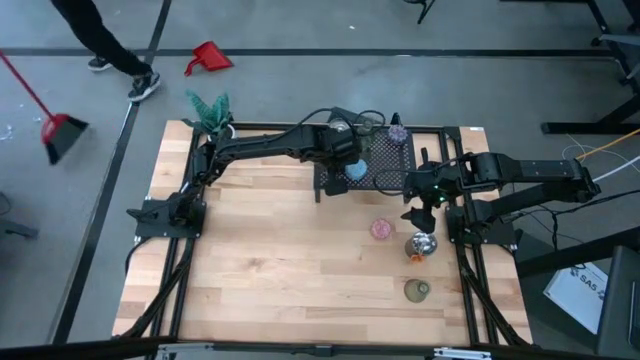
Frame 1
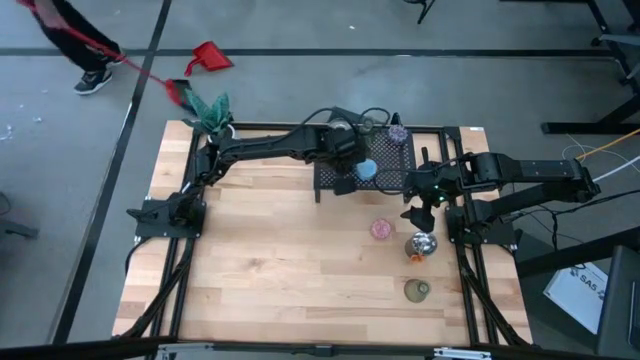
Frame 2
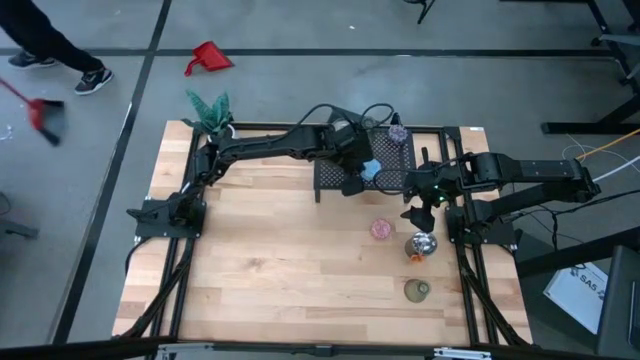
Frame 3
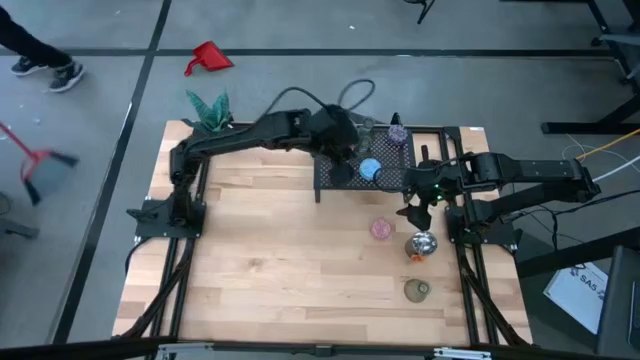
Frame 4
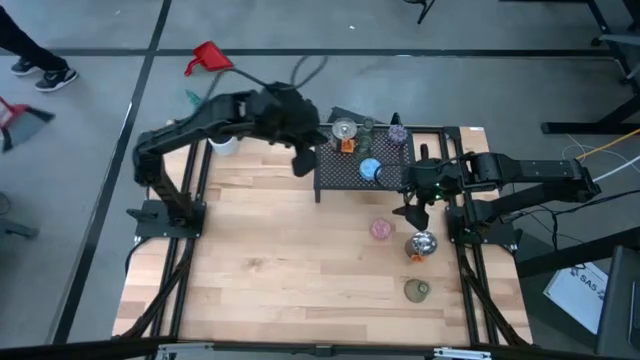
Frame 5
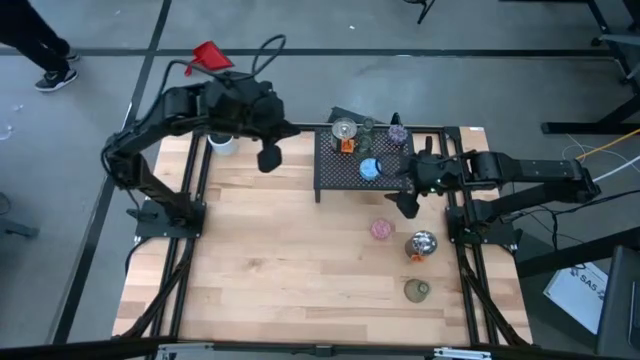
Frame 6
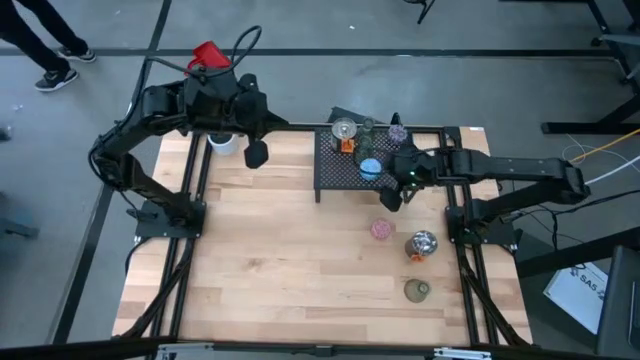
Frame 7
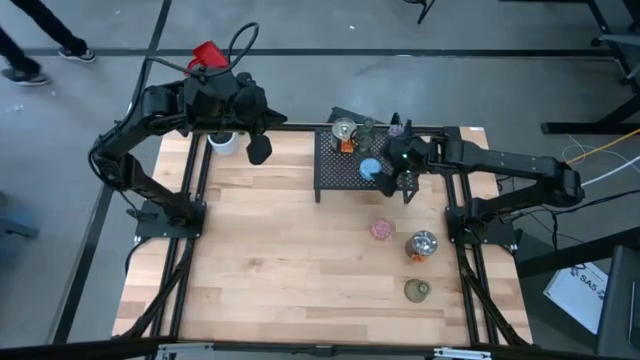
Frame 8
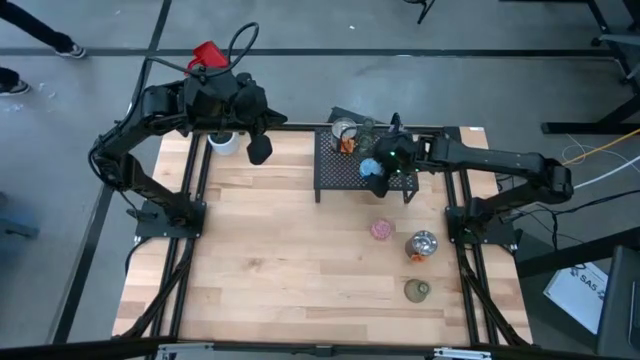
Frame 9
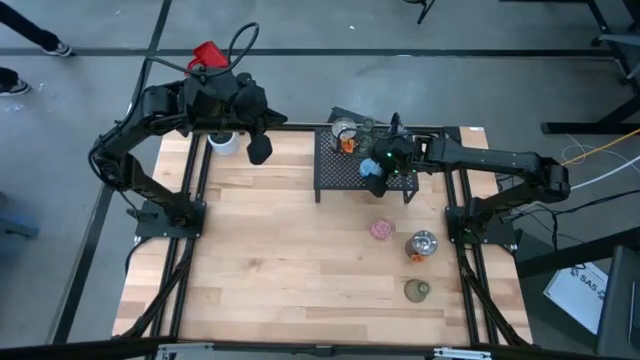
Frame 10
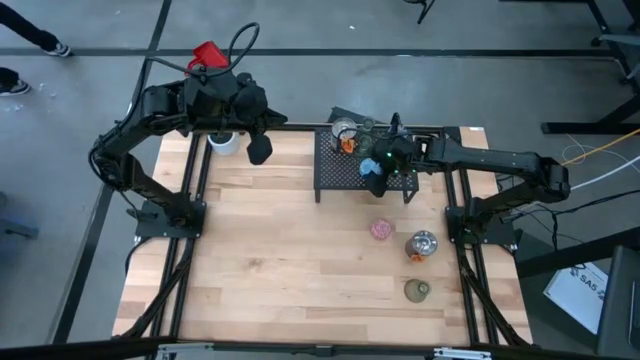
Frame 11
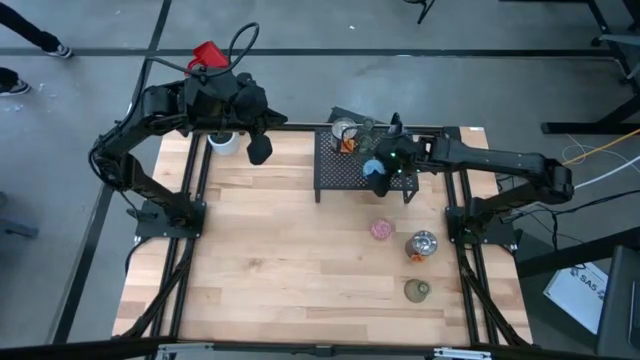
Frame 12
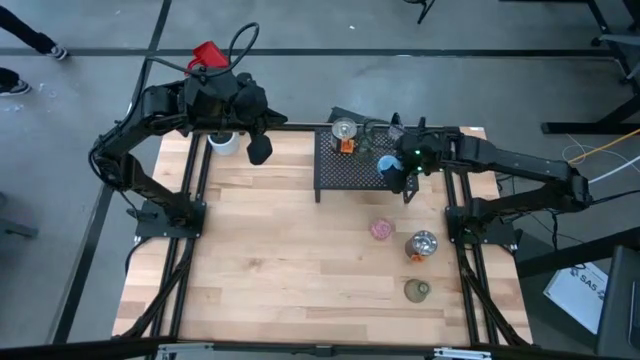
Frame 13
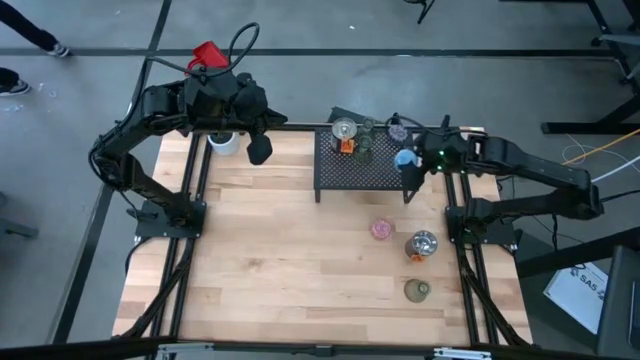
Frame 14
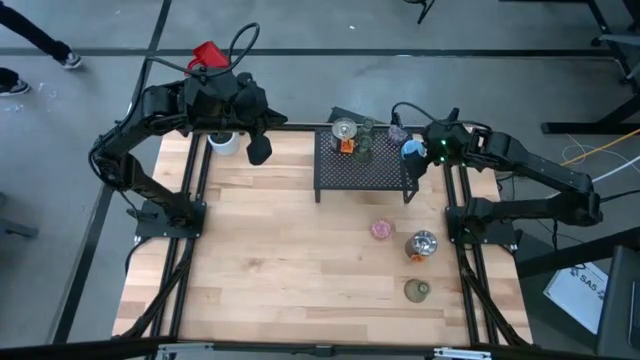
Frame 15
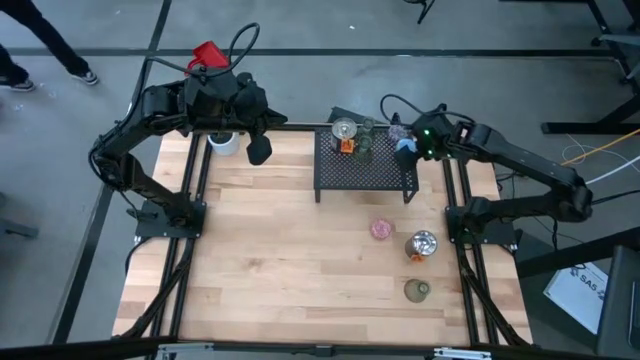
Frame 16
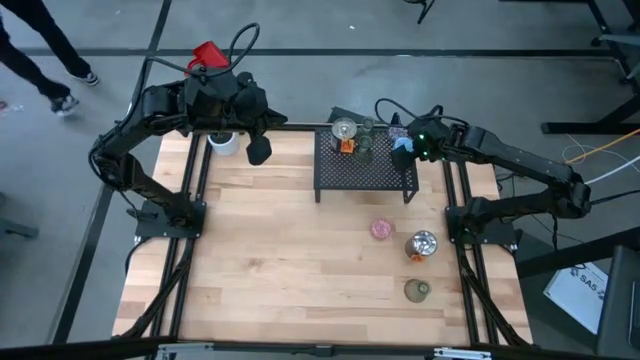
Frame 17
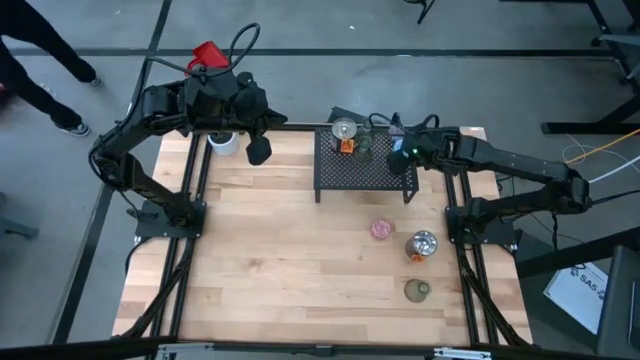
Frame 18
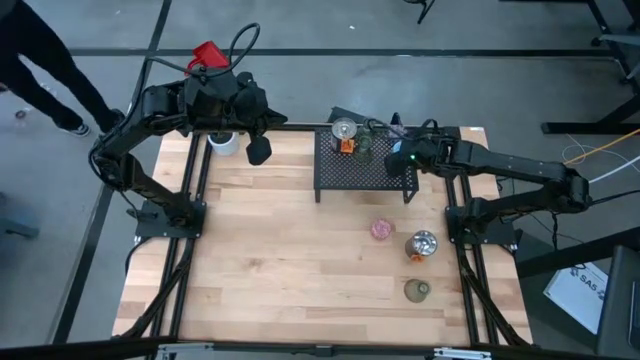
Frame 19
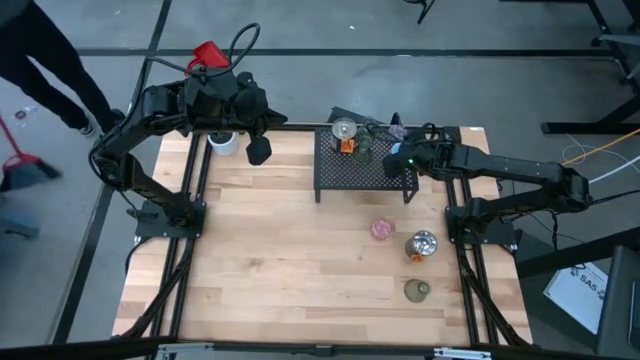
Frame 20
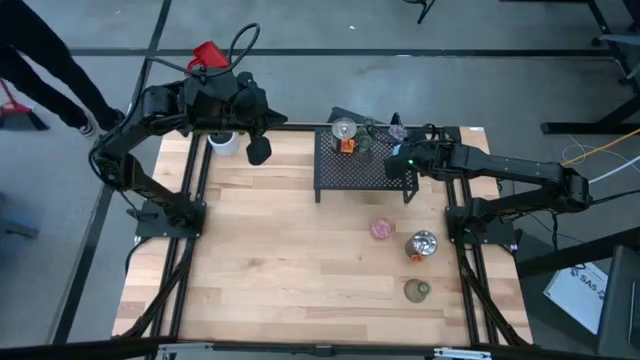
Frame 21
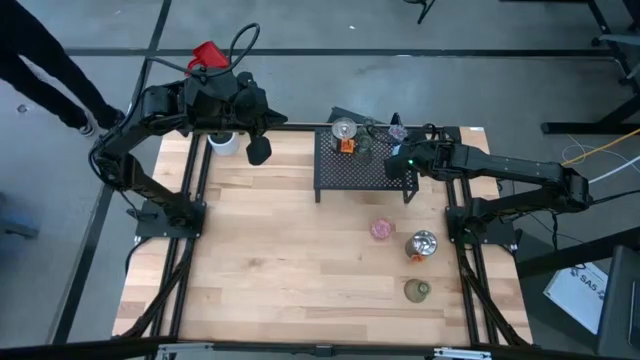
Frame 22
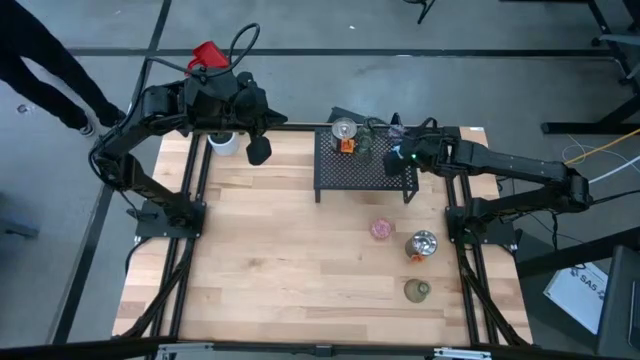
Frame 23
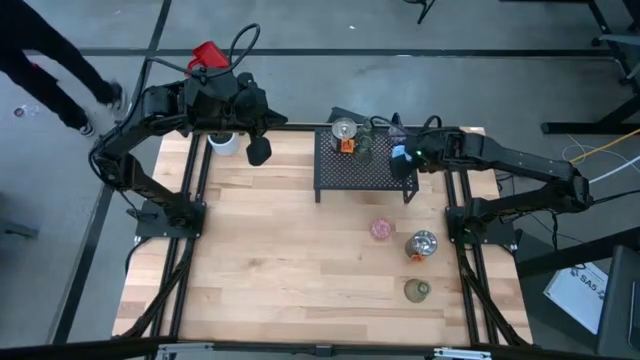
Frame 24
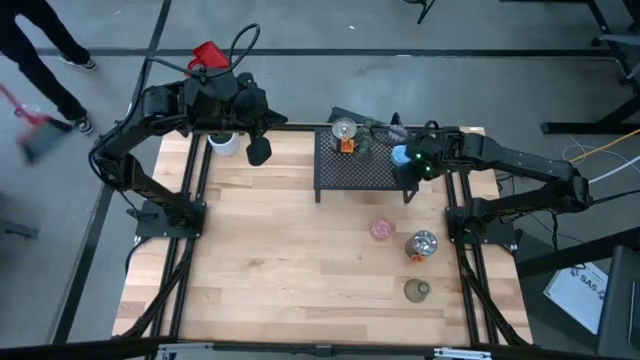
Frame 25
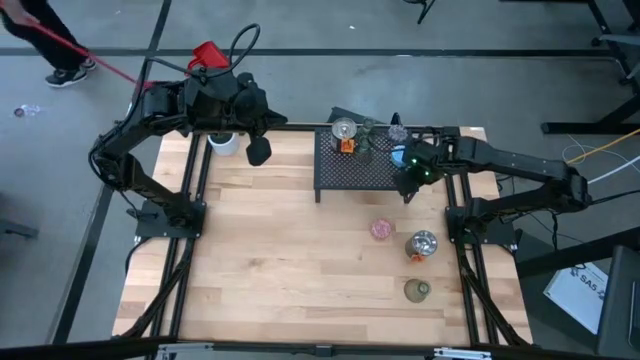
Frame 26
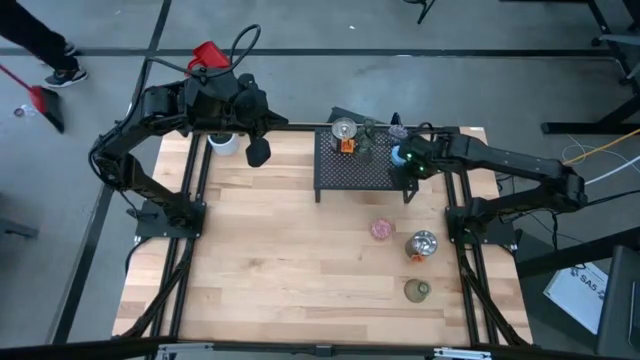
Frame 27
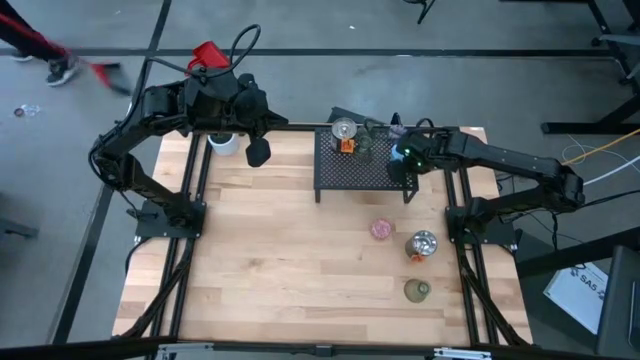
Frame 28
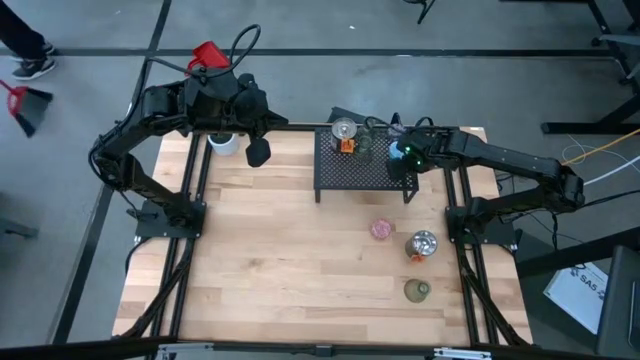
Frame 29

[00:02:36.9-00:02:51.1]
Task: Pick & Place candle stick holders
Put the blue scented candle on the shelf align with the red scented candle

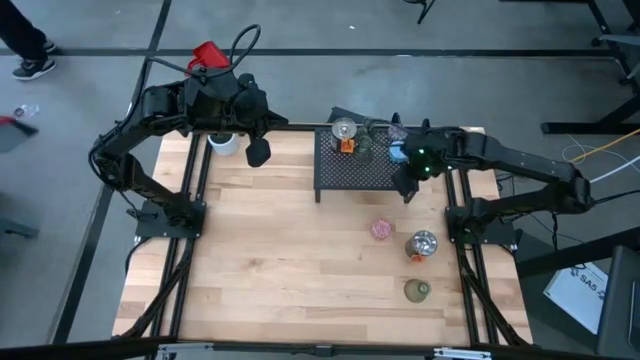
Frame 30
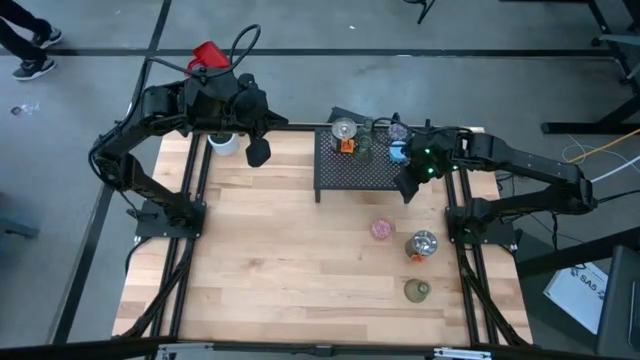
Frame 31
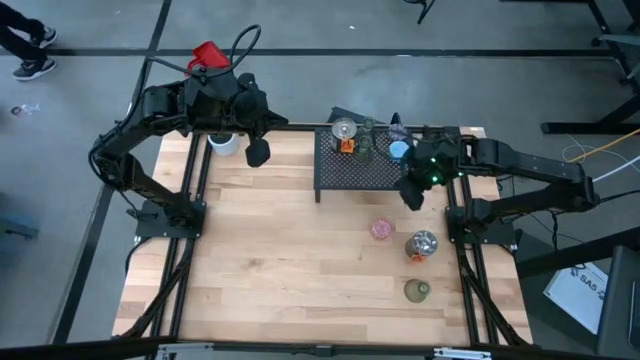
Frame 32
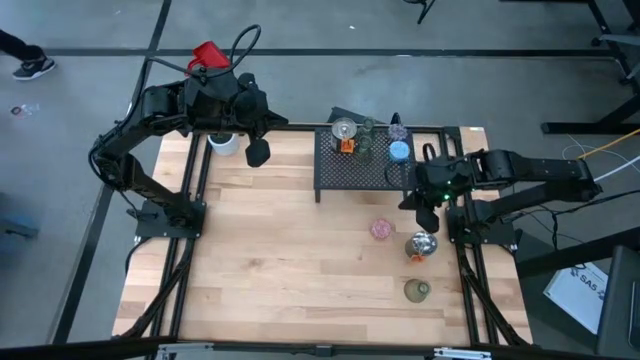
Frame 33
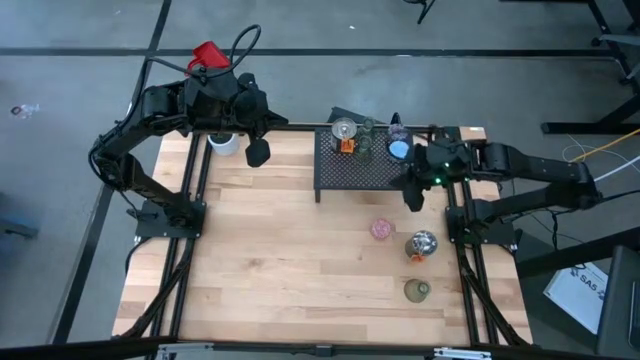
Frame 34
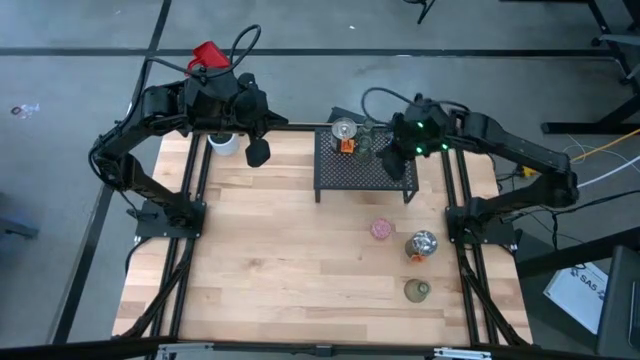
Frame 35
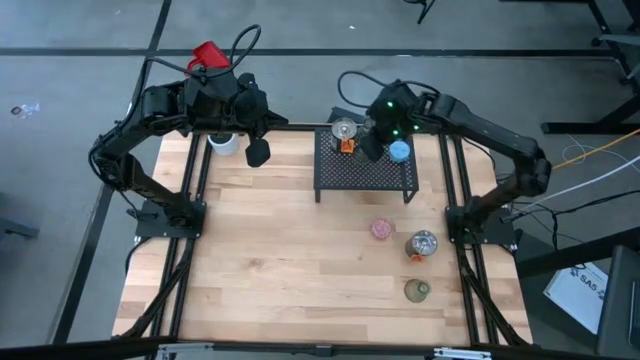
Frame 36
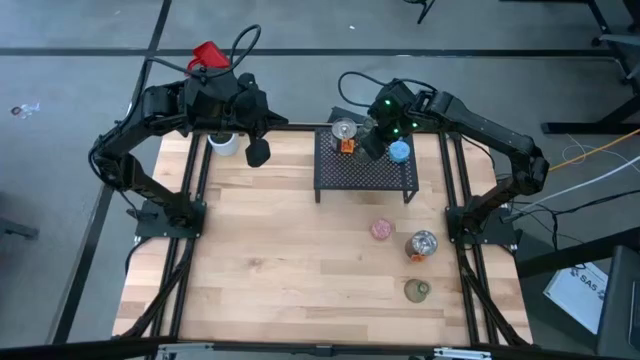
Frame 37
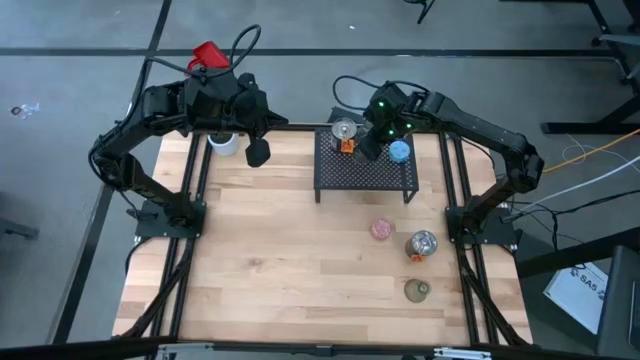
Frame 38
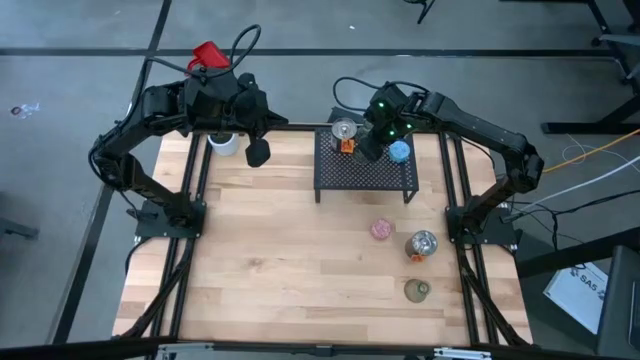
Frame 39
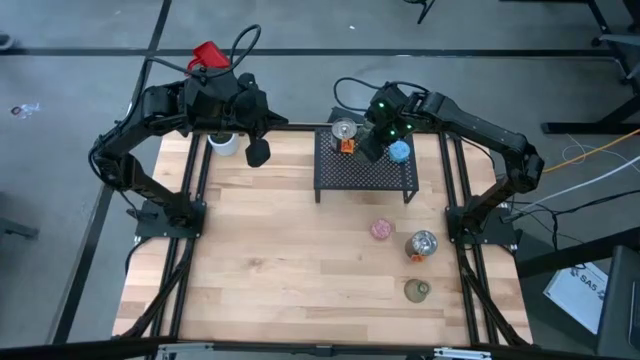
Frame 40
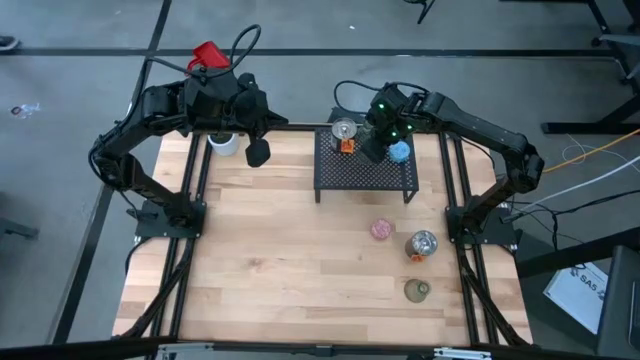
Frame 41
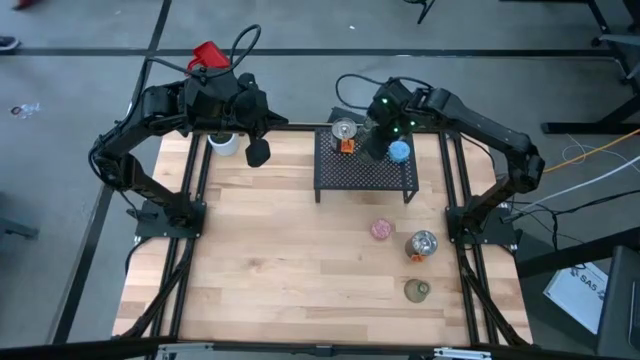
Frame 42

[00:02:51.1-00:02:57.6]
Adjust the green vase candle holder on the shelf

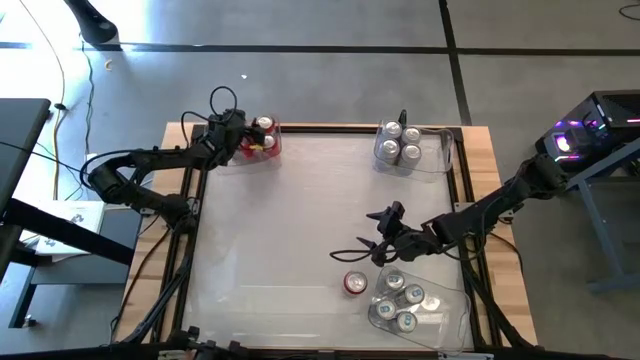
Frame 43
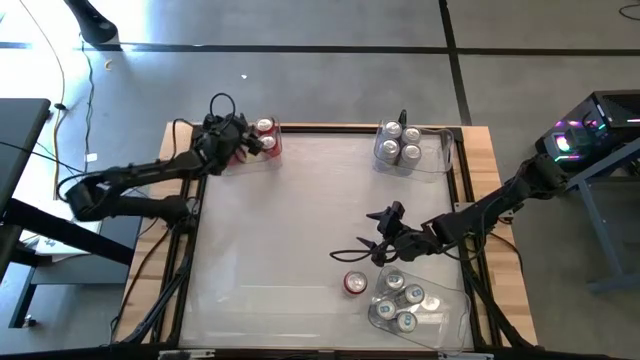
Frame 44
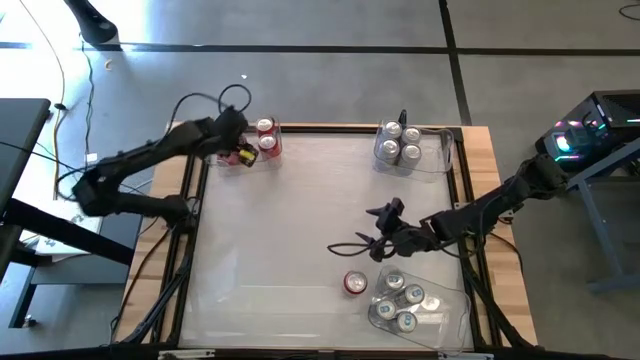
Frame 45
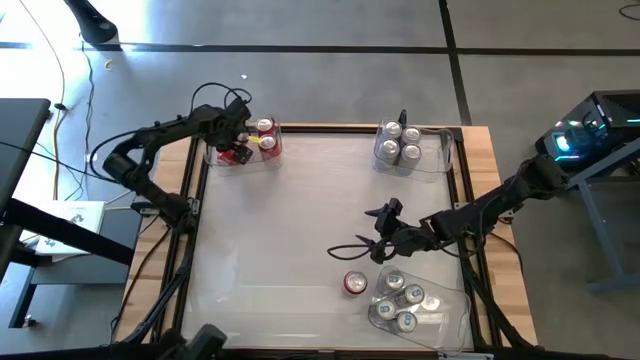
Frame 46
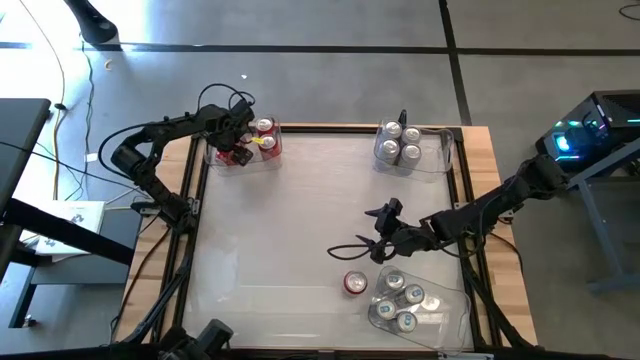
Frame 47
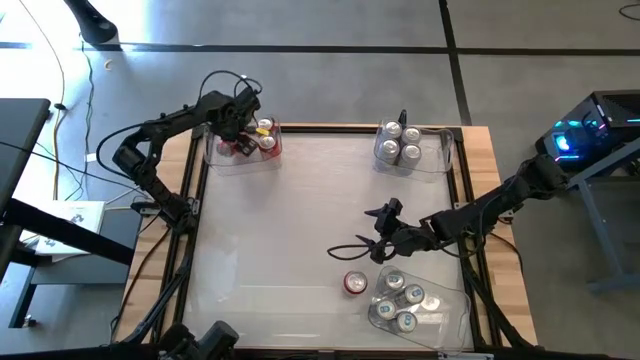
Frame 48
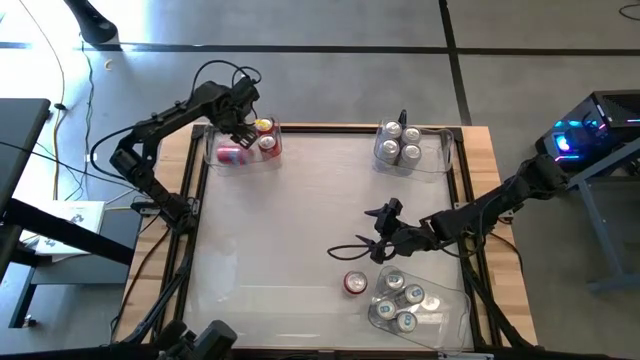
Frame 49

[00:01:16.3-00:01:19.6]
Task: Sort soda cans
Remove the red soda can from the top left transparent bin
